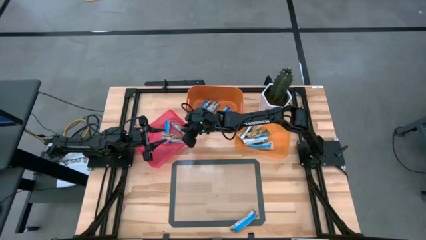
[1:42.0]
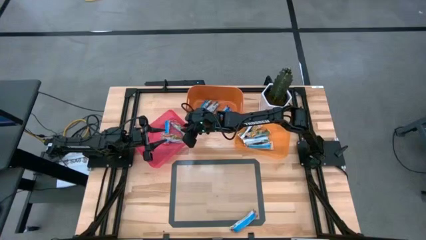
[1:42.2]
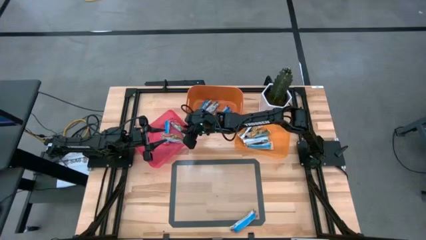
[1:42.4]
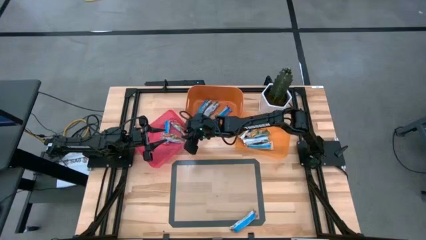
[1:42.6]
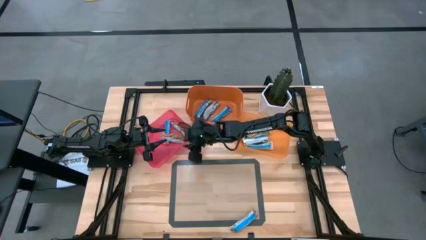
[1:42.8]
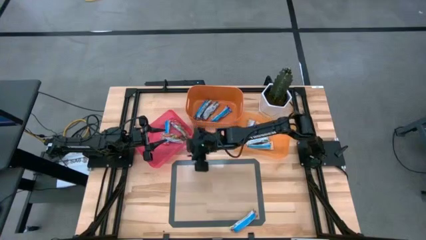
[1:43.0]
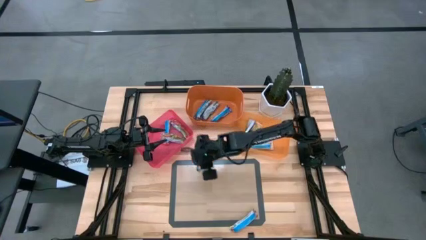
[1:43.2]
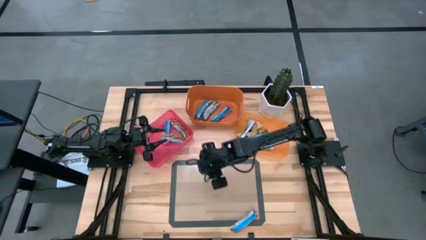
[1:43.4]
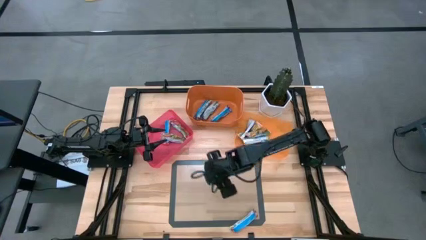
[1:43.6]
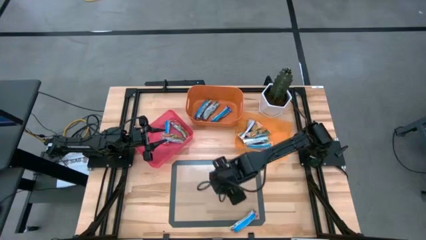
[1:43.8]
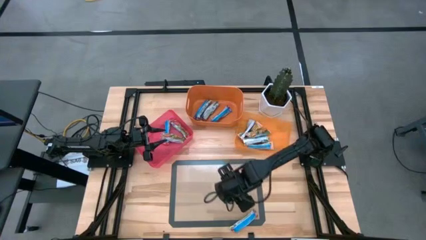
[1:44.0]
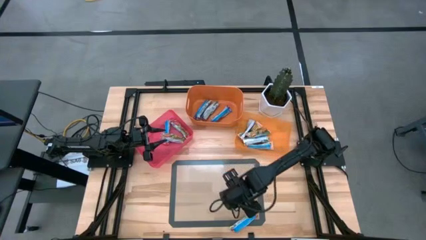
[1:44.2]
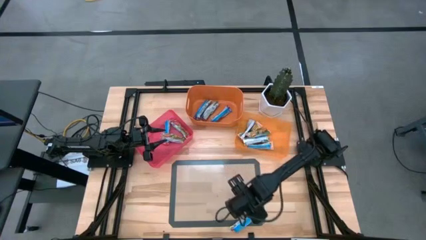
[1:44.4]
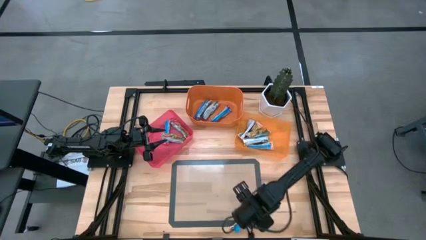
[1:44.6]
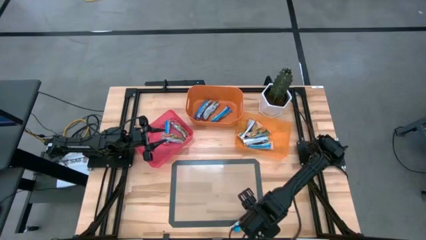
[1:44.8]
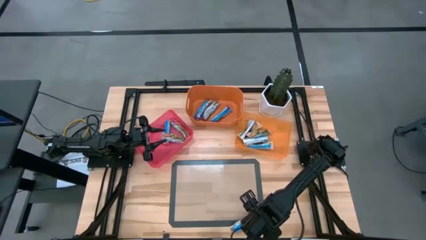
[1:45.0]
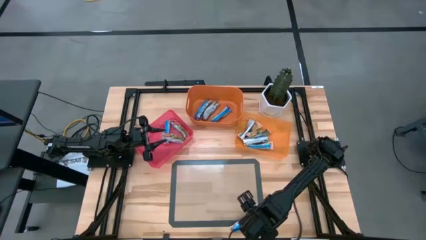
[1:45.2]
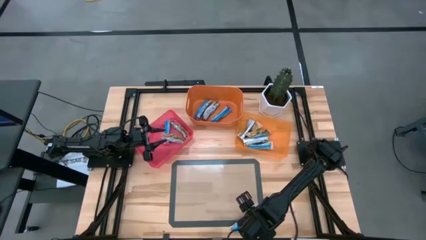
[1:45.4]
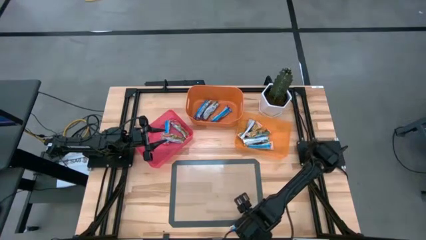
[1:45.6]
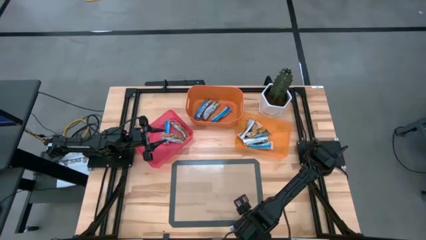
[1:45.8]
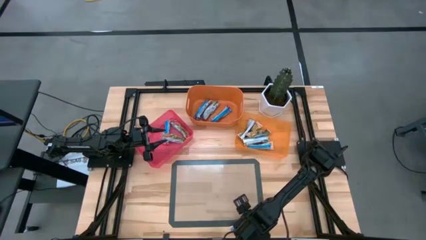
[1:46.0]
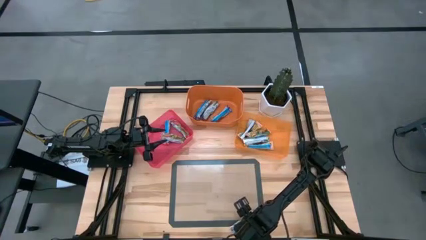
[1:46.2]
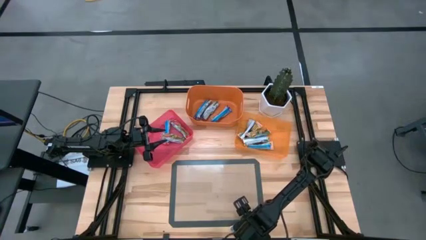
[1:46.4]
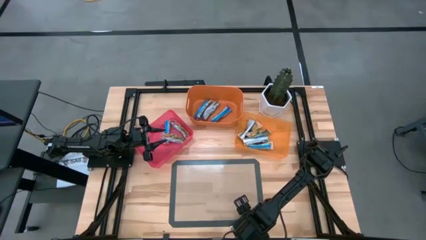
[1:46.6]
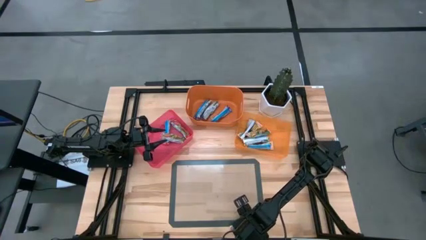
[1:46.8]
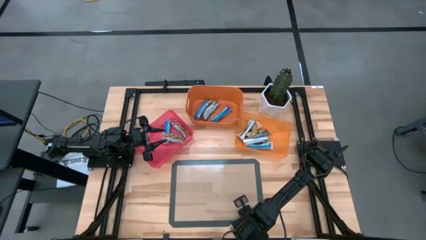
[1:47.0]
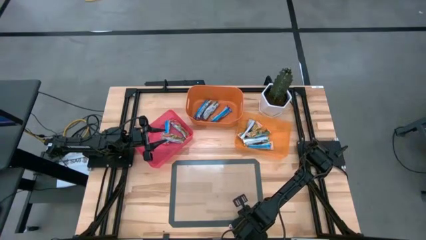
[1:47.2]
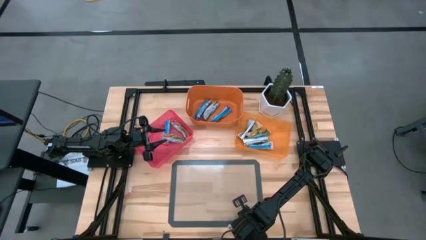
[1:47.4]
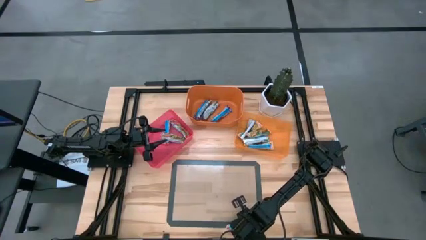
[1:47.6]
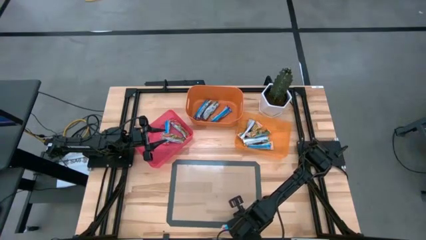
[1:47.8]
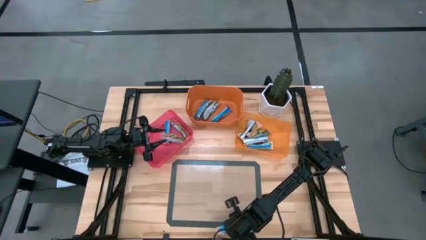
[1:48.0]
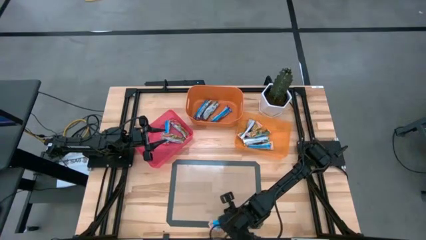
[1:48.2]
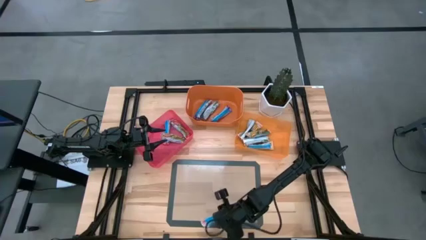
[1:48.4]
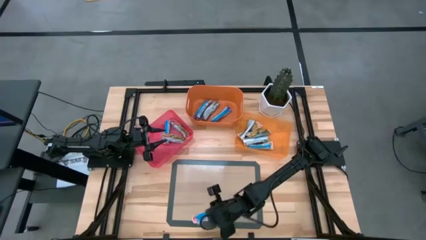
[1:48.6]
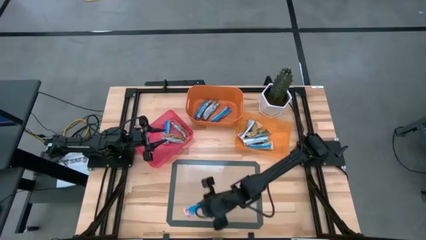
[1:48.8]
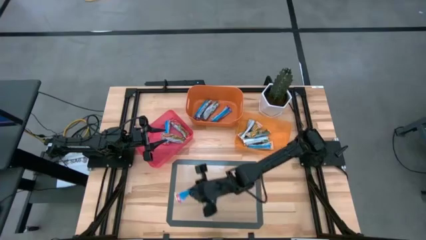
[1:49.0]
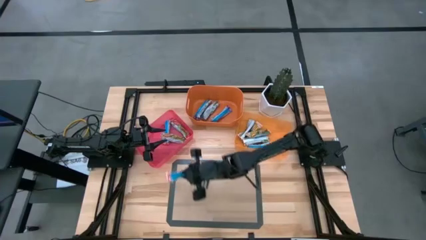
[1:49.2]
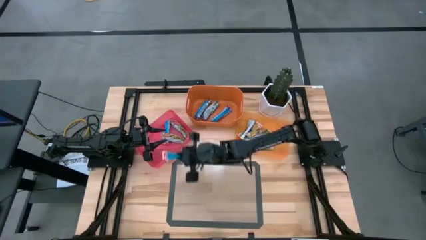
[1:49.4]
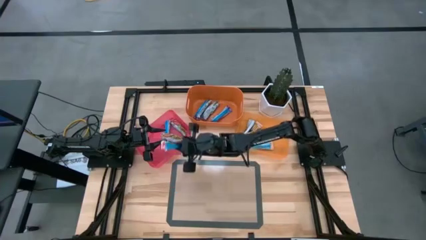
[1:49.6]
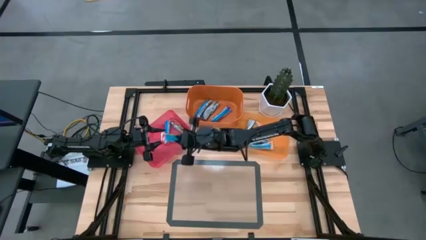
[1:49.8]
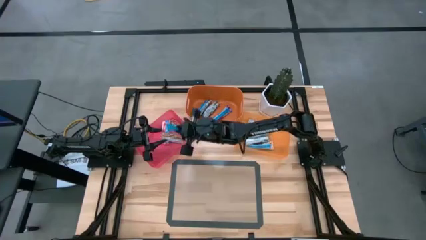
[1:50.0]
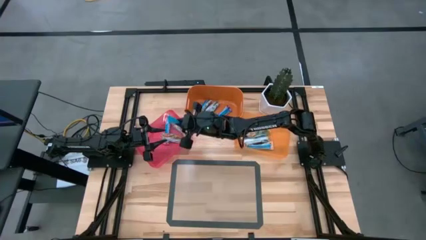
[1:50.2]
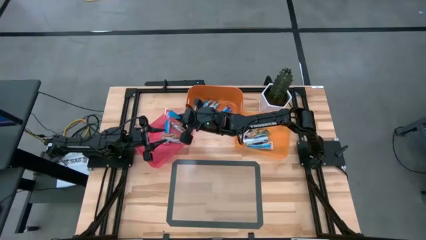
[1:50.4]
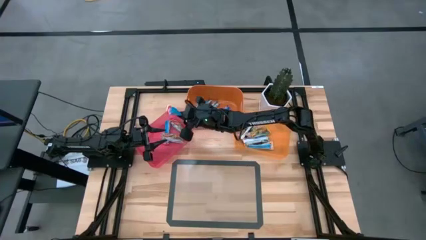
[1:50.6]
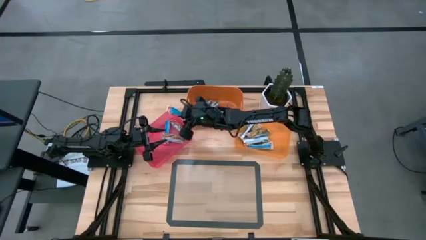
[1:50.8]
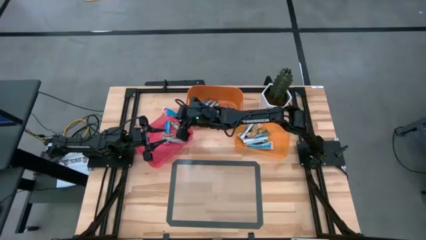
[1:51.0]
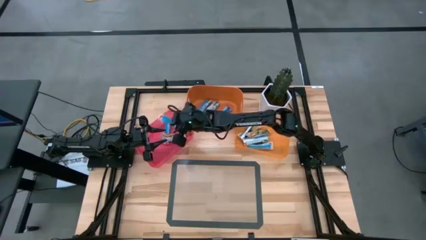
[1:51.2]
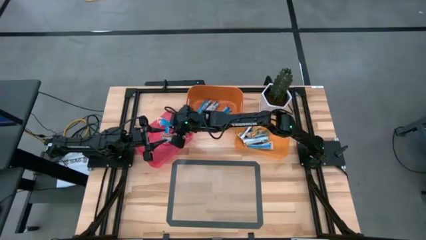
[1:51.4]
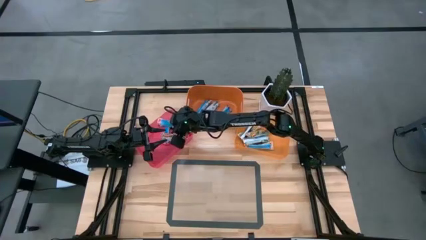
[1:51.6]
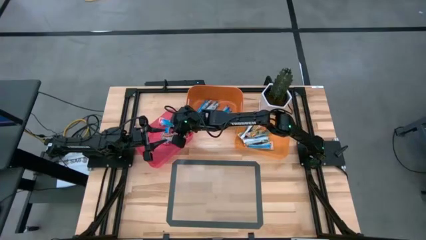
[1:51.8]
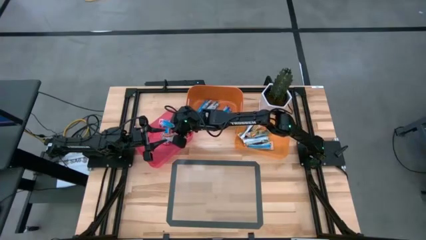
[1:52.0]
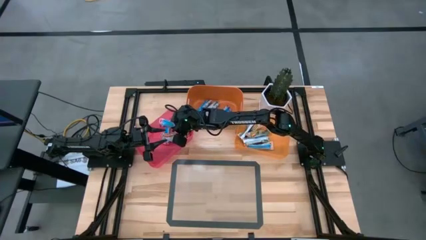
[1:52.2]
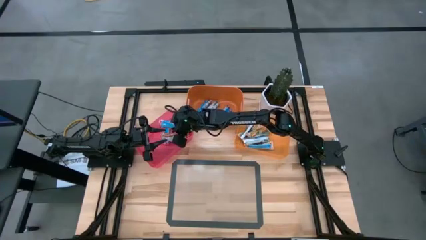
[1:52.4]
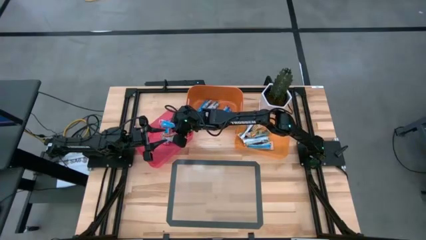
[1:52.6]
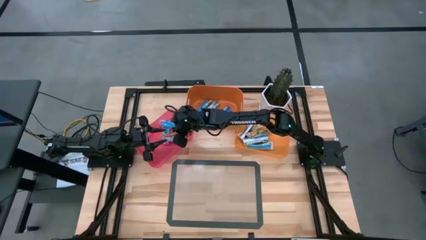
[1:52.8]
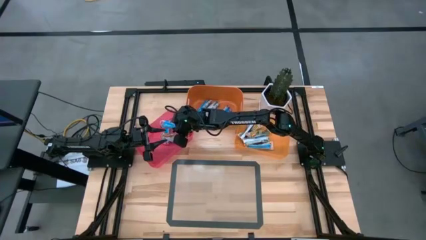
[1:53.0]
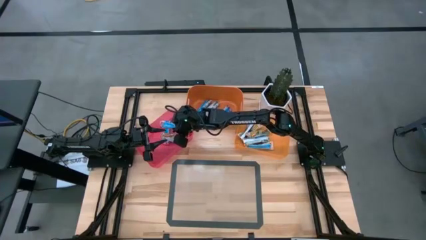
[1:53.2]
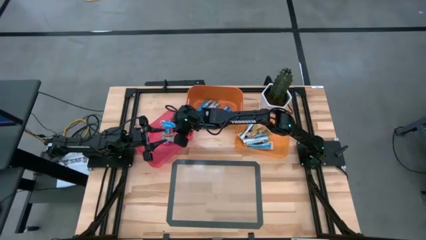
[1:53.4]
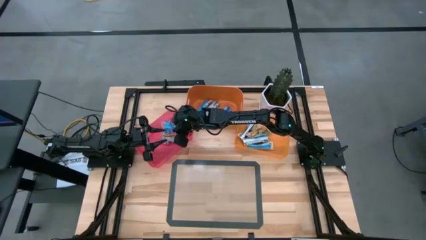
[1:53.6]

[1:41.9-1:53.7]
Task: Pick and place Granola Bars by type
Put the red granola bar into the red bin

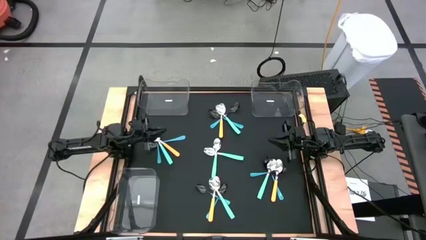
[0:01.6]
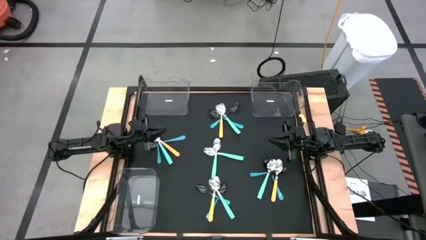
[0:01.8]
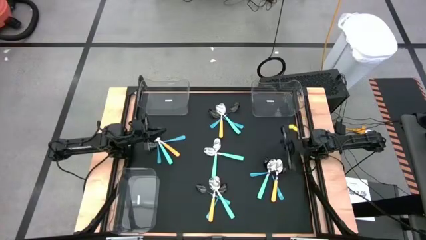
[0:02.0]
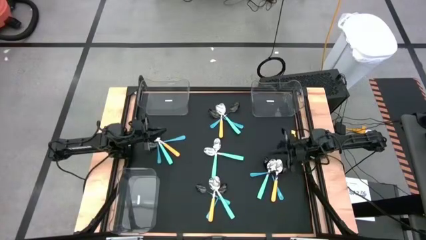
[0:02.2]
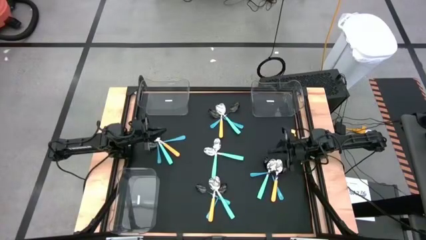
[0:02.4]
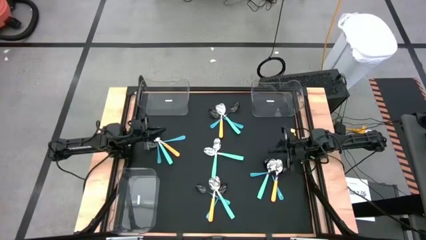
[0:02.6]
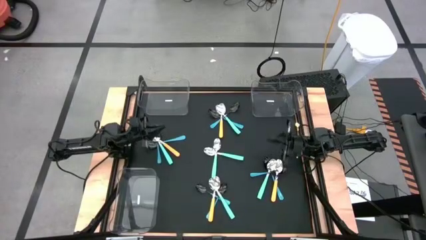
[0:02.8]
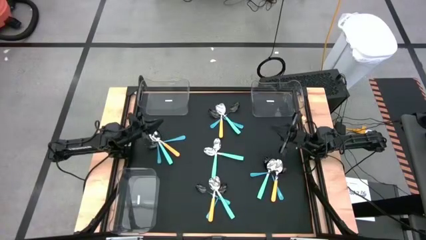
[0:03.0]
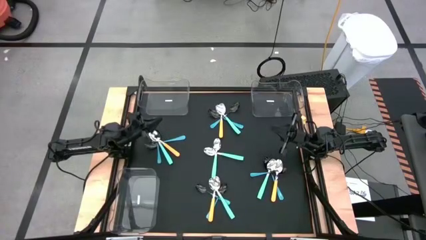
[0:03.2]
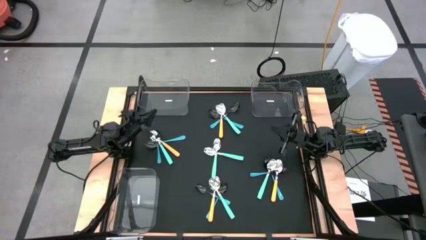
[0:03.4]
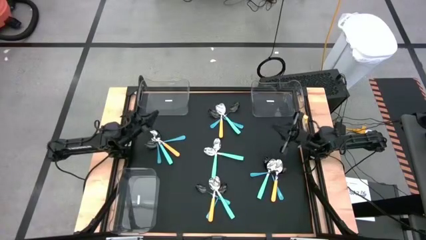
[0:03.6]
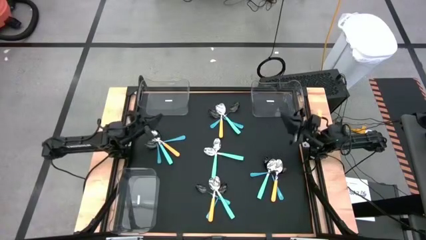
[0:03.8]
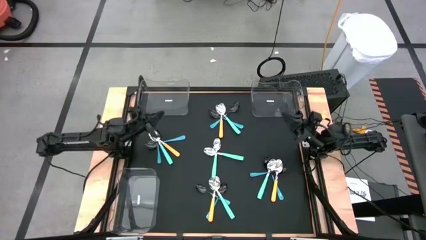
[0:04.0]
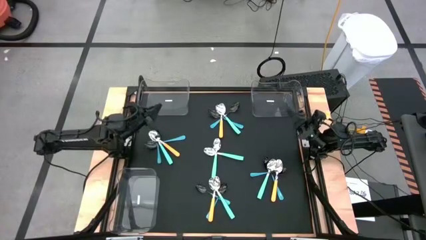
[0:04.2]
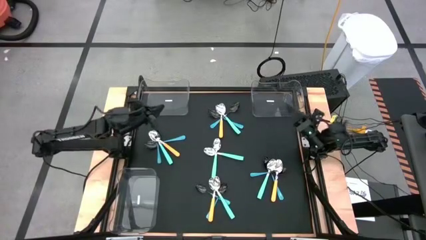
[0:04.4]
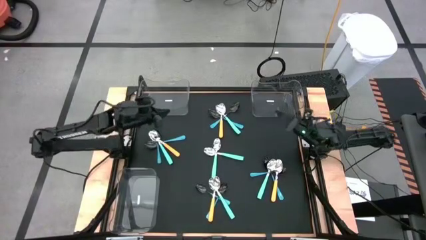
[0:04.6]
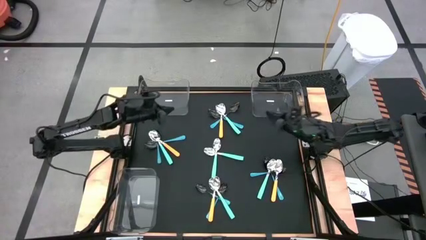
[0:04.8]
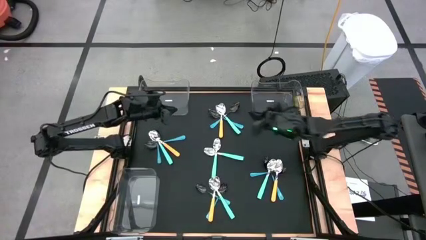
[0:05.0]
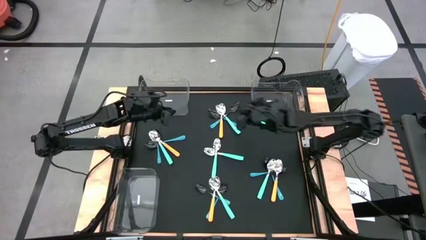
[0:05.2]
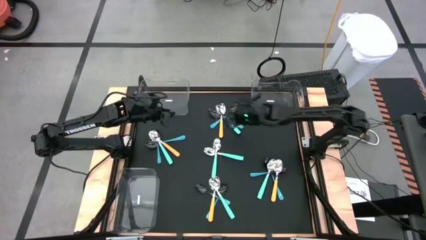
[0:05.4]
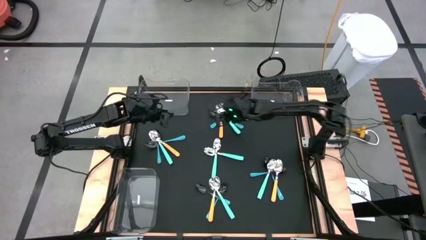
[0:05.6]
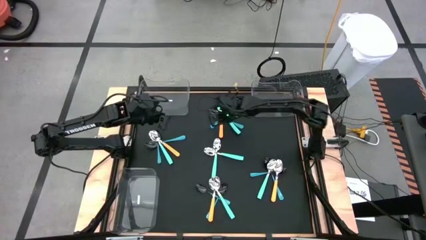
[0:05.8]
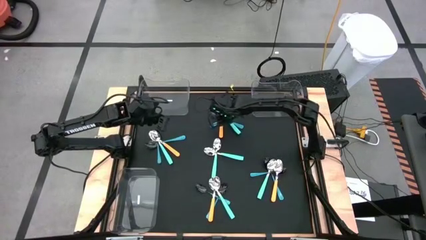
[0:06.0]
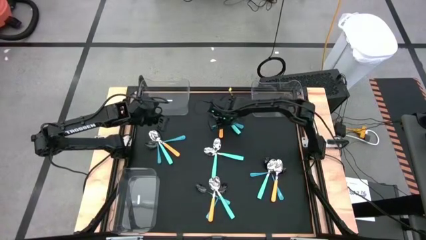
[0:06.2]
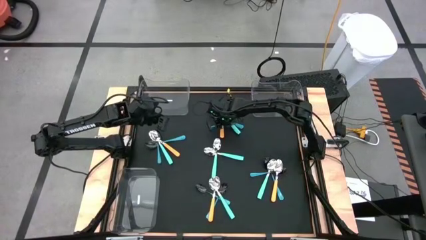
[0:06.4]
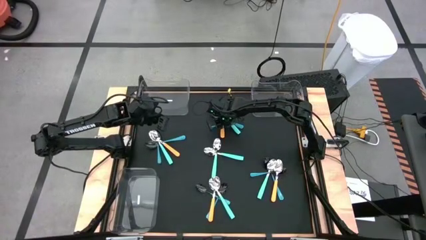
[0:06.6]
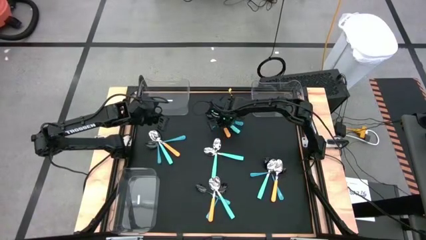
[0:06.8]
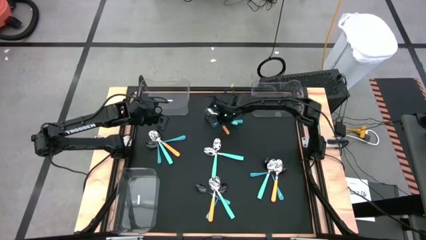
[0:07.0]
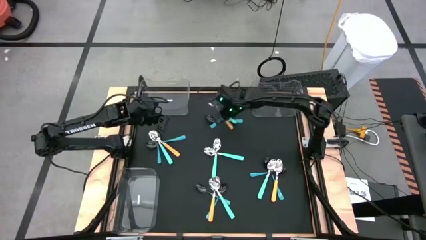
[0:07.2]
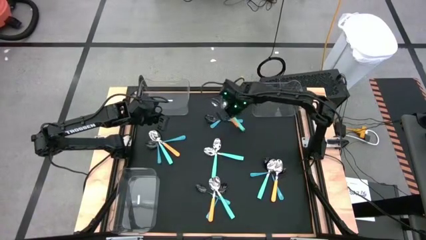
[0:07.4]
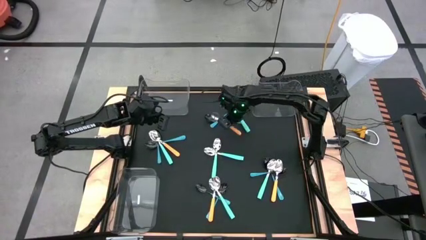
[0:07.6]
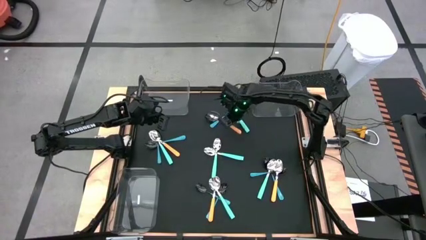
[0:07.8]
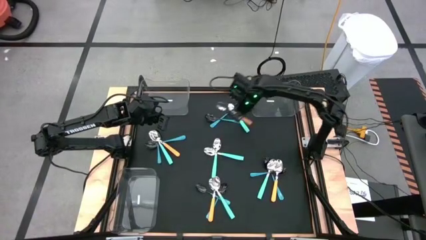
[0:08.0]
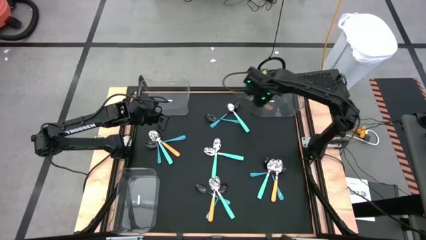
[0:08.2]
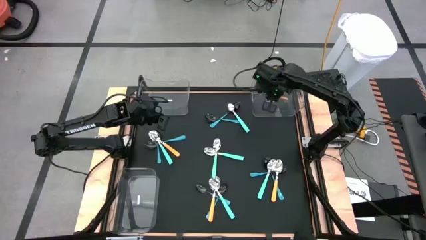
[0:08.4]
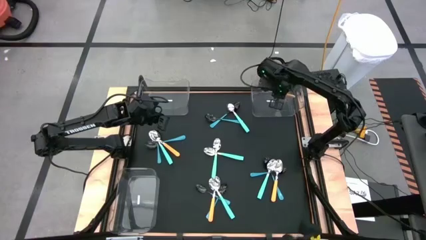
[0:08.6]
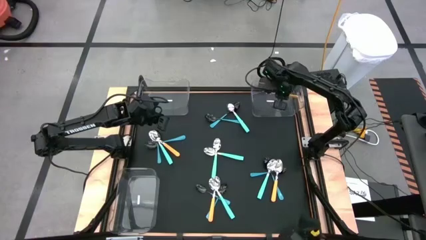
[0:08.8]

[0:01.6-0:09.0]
Task: Sort silverware by color (type)
Put the yellow spoon into the top right transparent bin
